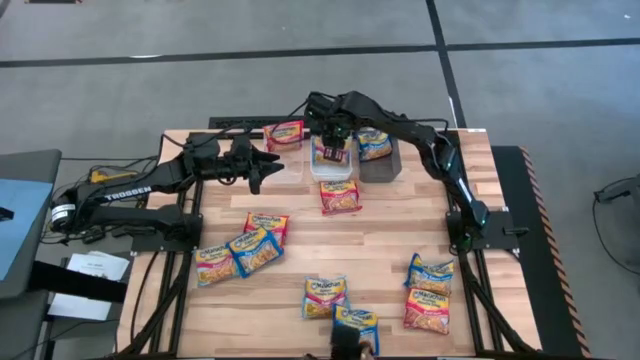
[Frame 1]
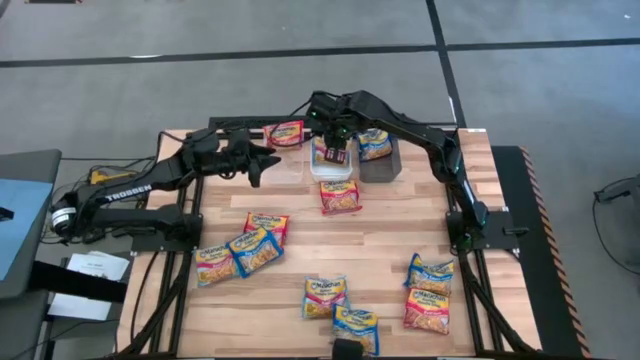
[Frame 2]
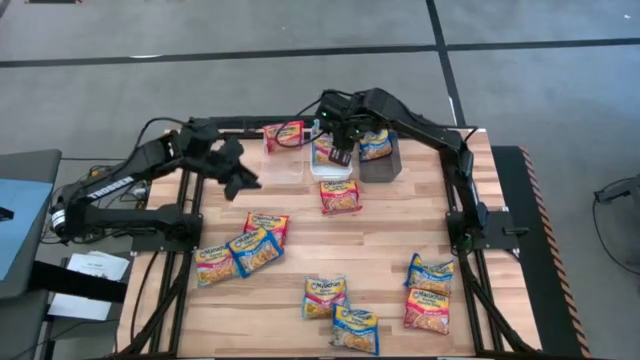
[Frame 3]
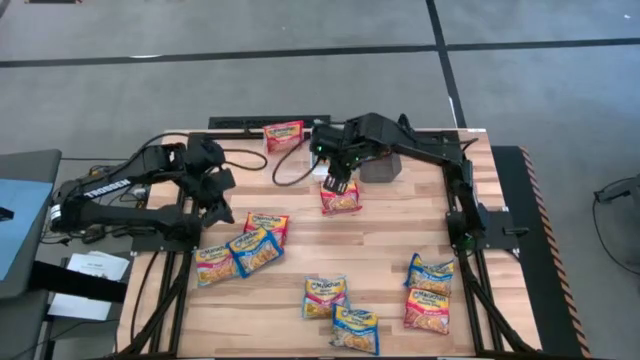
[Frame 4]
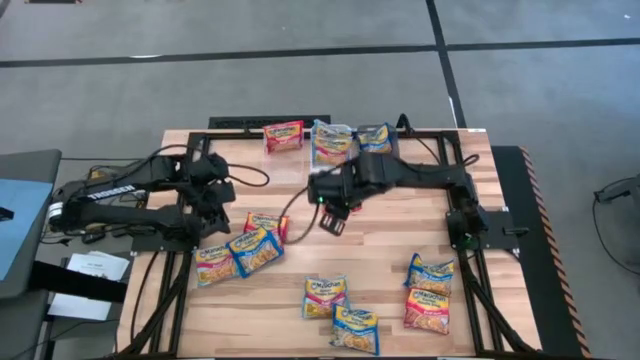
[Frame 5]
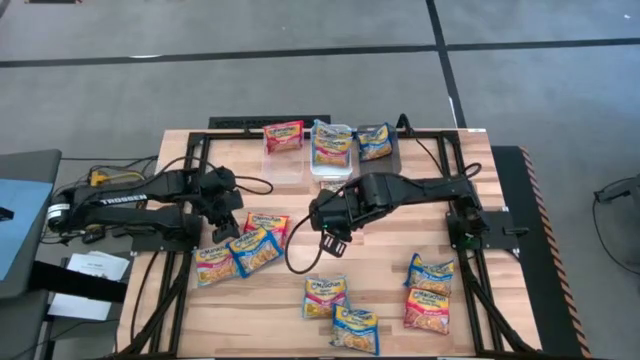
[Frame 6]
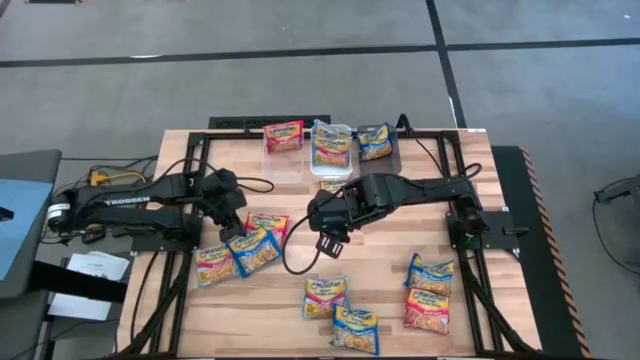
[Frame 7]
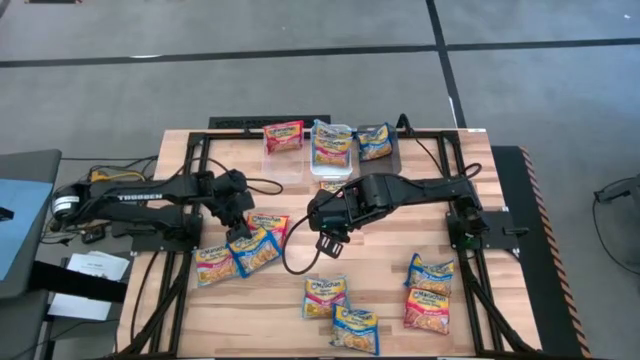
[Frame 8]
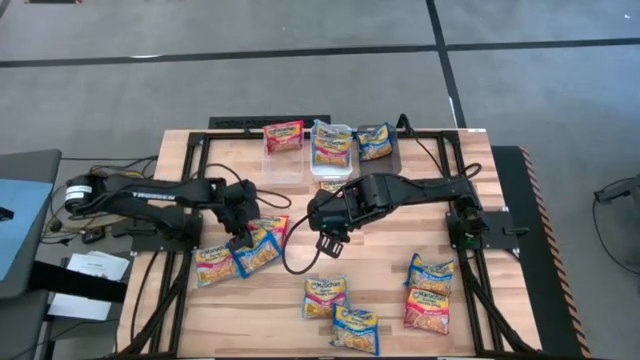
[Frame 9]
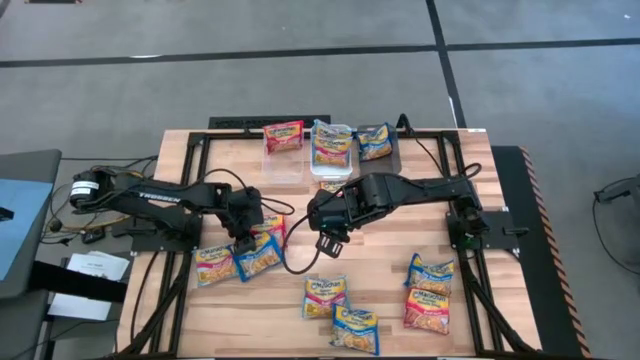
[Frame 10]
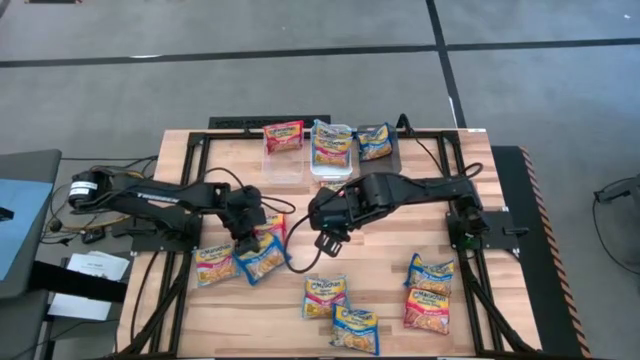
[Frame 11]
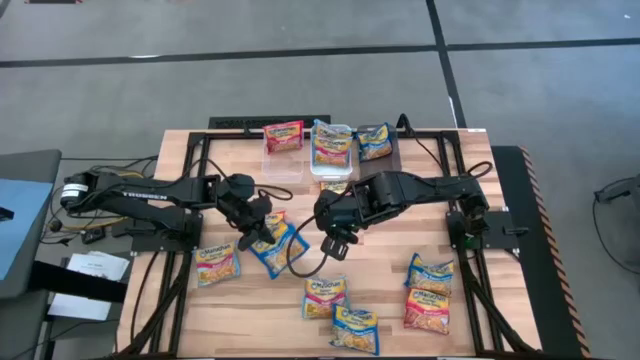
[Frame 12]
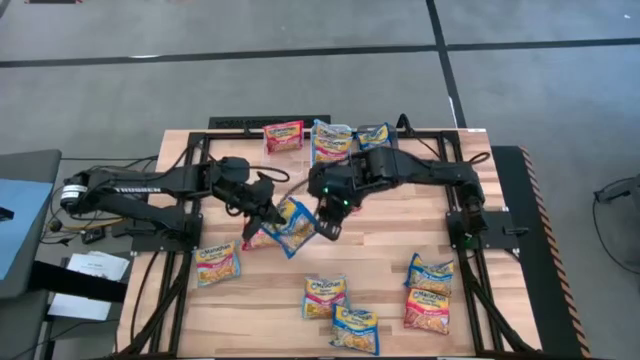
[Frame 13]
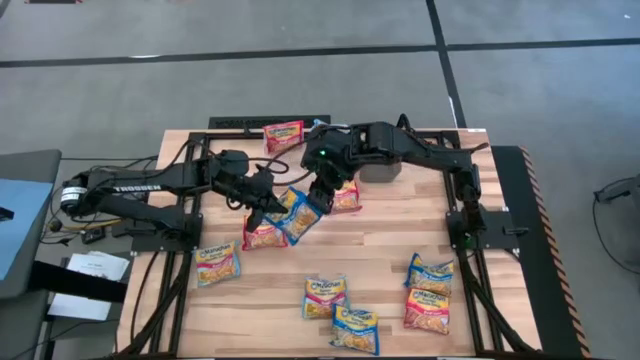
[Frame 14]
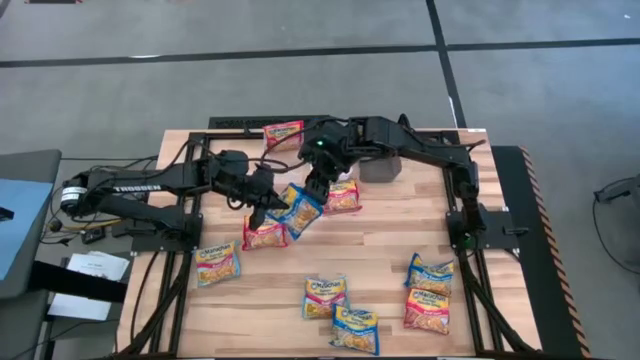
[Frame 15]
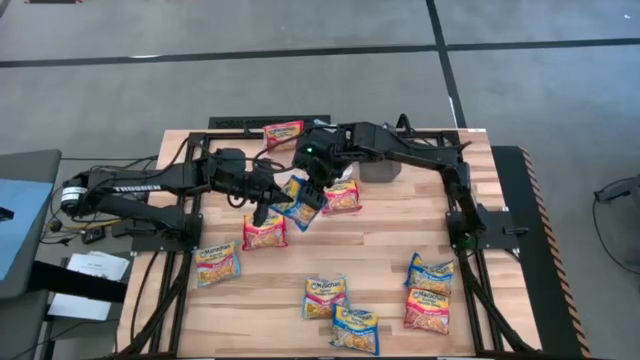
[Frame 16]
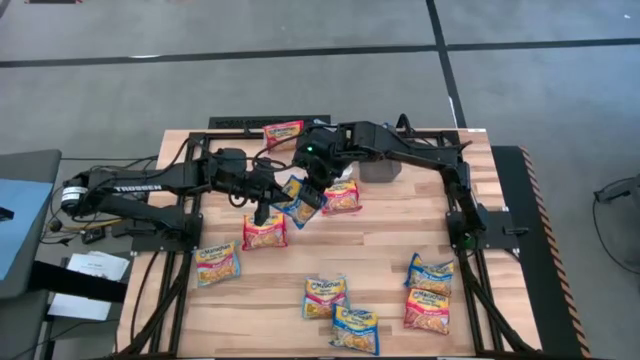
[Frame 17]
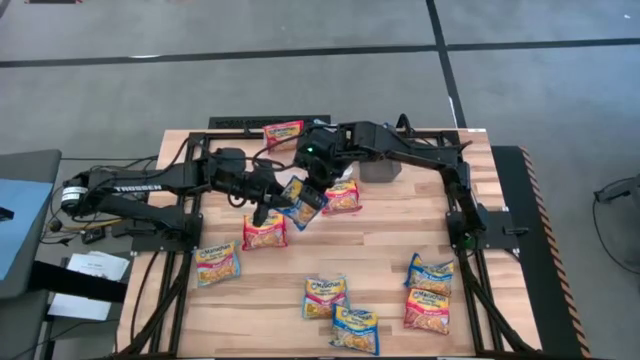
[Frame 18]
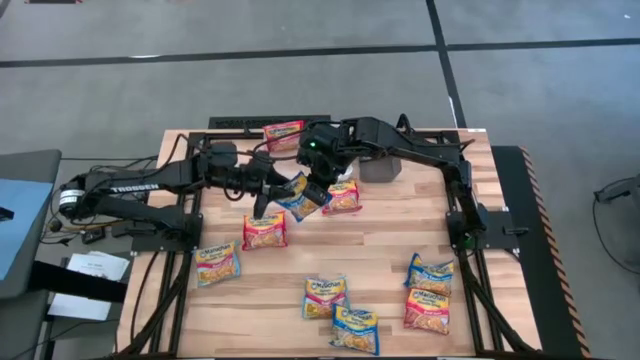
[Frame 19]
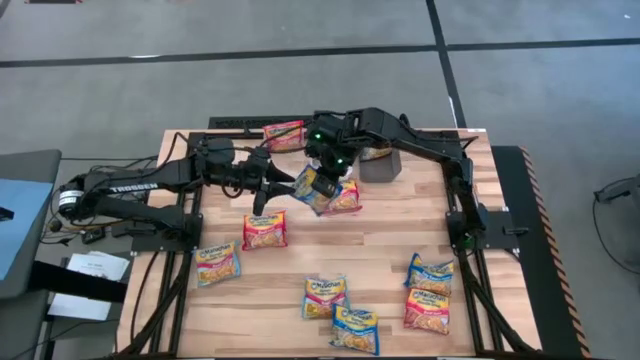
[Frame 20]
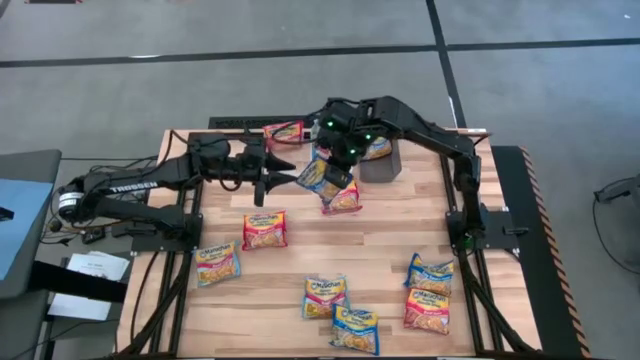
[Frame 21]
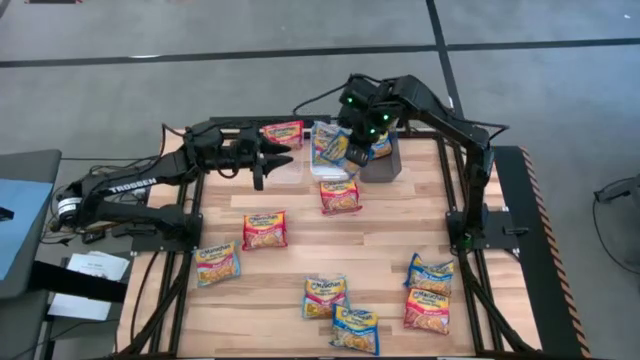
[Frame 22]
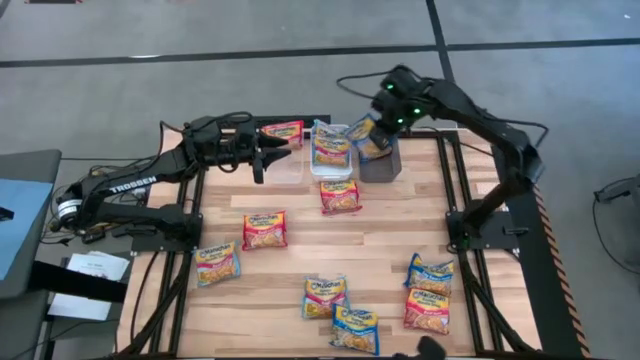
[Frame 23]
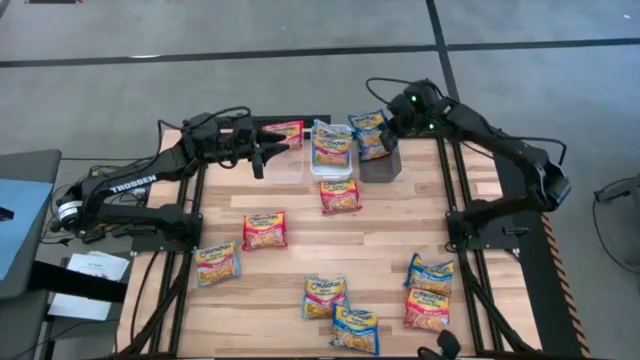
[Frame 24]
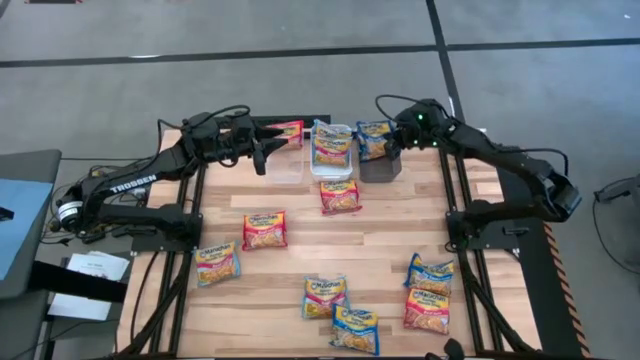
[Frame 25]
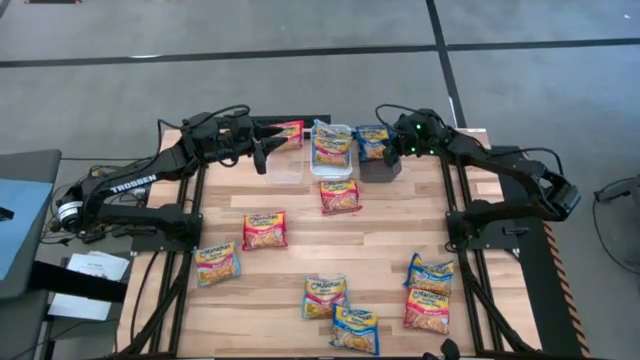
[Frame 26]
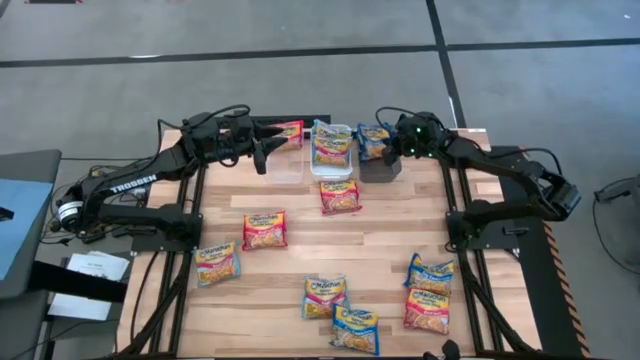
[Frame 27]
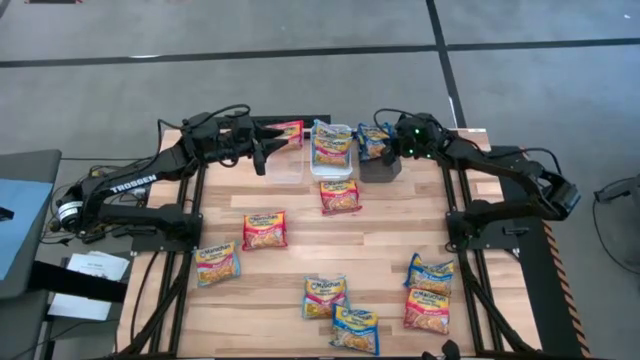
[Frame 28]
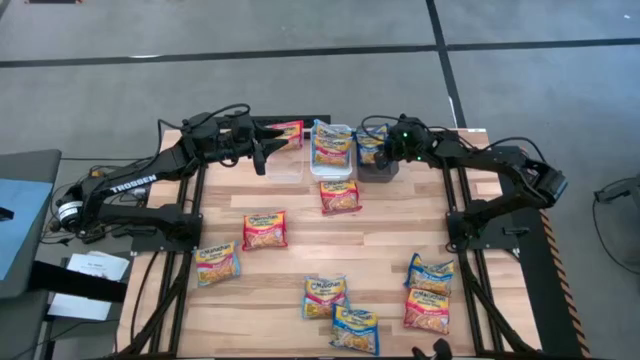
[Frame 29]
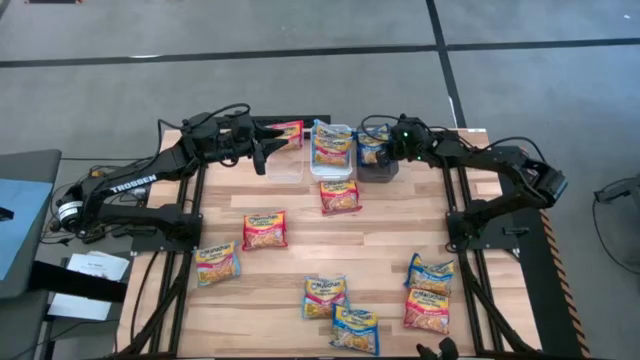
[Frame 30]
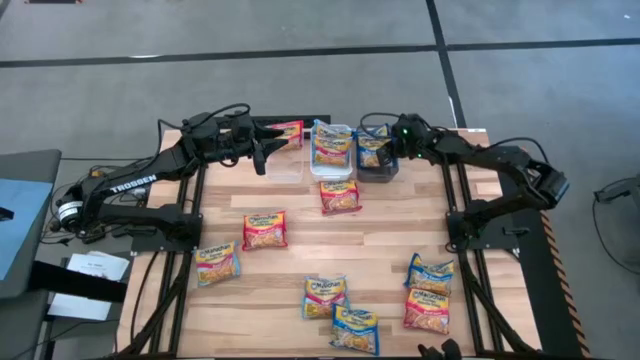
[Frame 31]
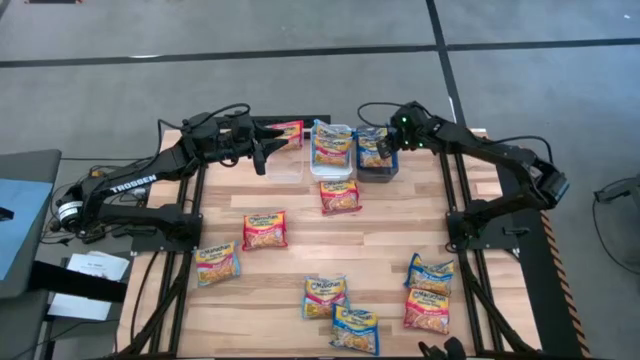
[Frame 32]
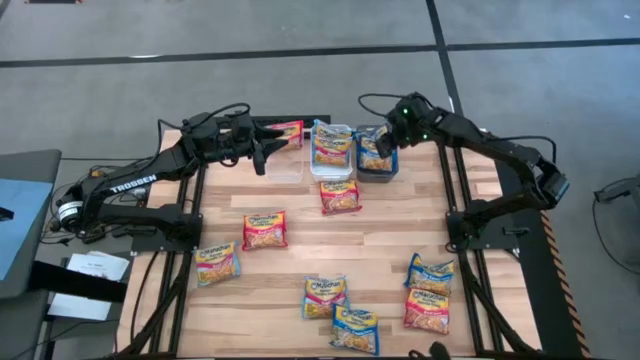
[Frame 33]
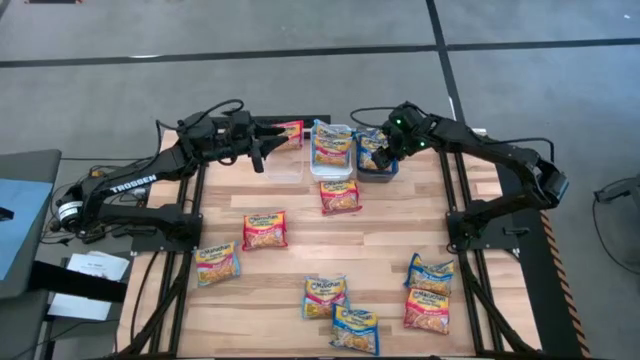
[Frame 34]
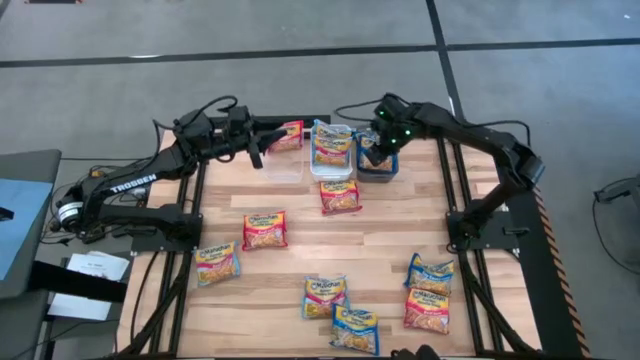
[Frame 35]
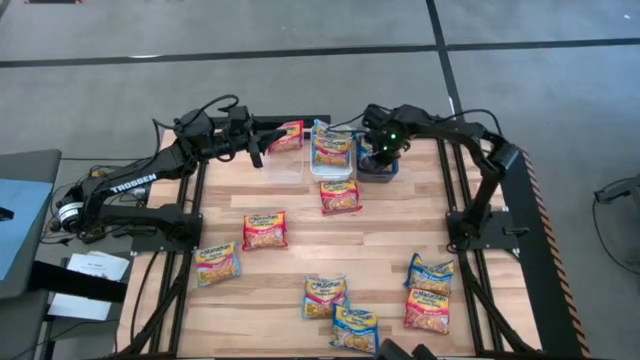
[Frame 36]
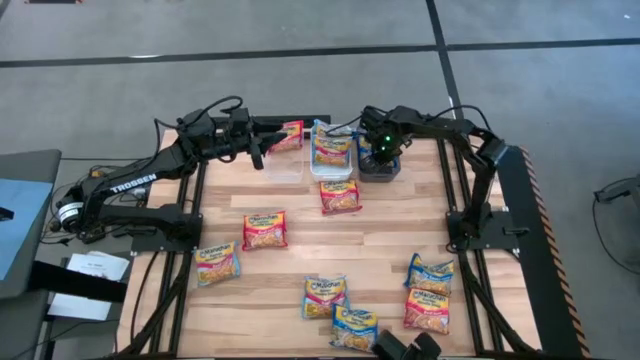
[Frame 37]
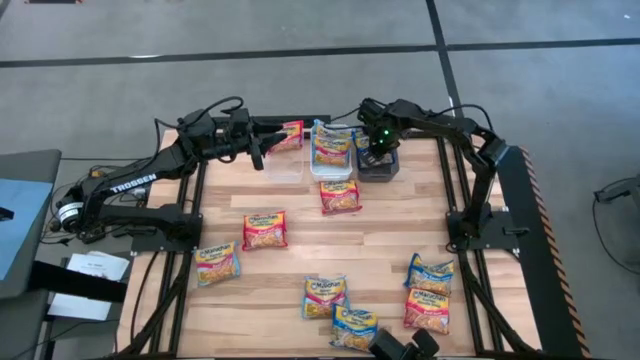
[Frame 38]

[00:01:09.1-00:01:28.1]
Task: Sort Maruchan noodles
Put the blue noodle pack into the black bin

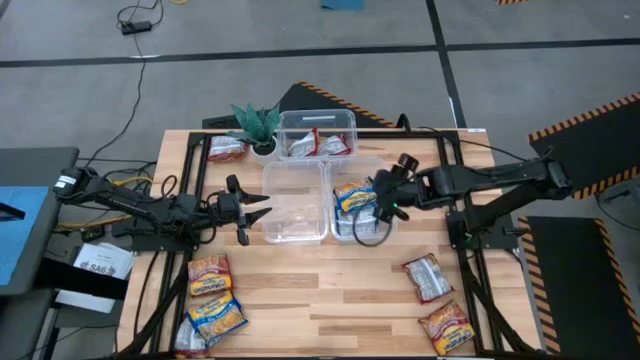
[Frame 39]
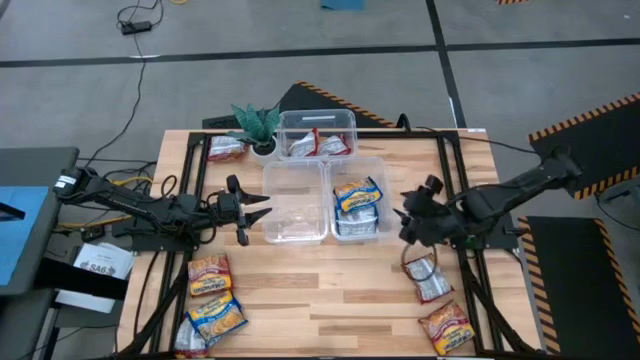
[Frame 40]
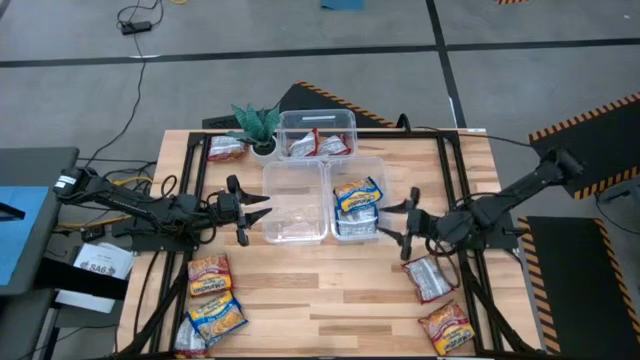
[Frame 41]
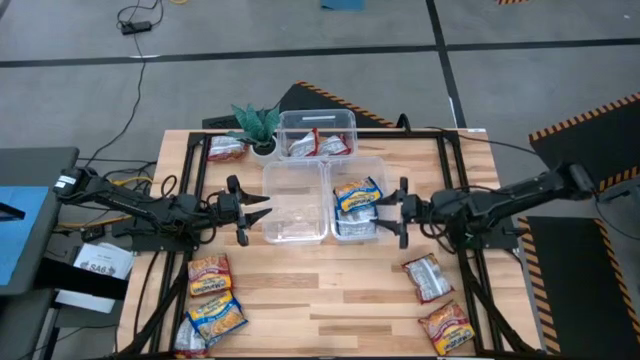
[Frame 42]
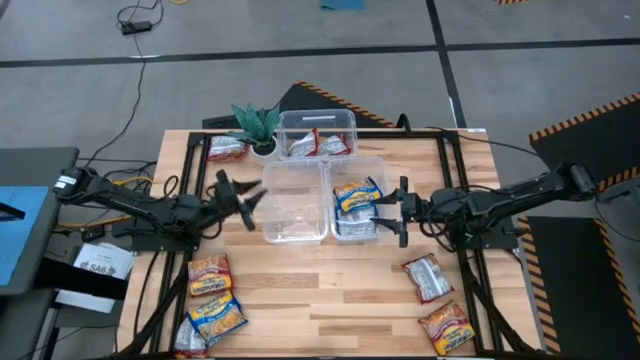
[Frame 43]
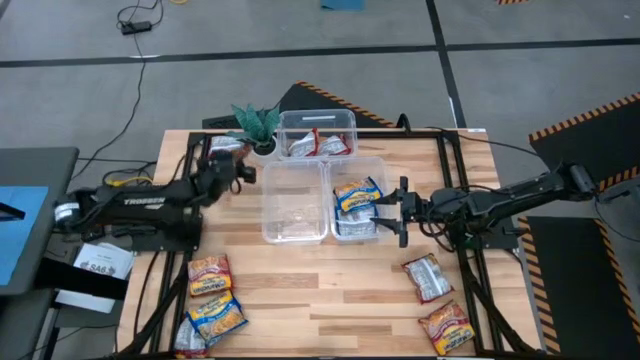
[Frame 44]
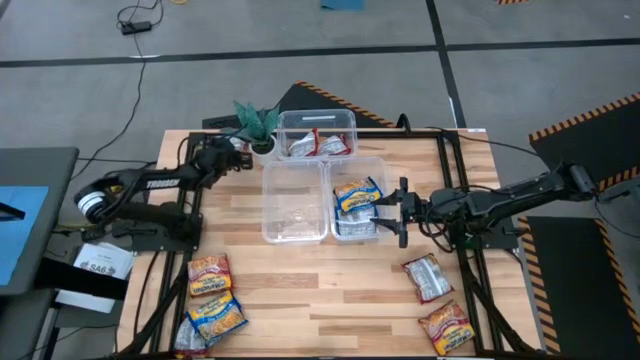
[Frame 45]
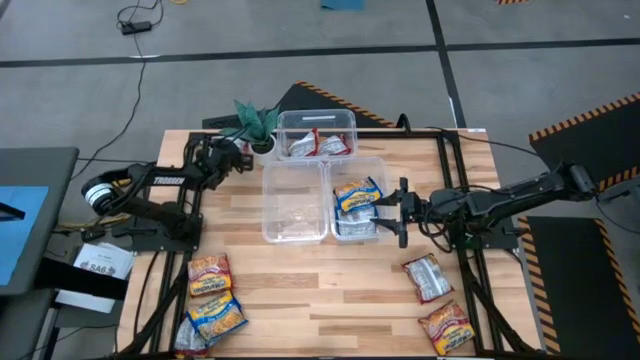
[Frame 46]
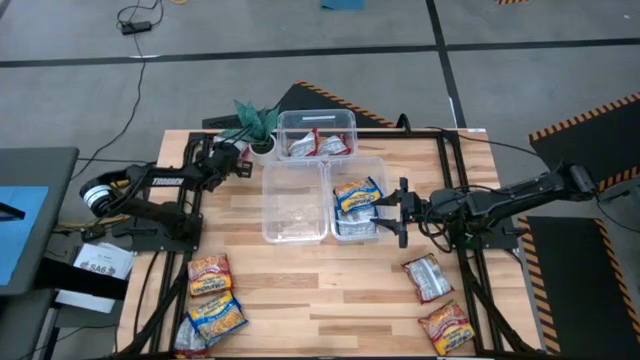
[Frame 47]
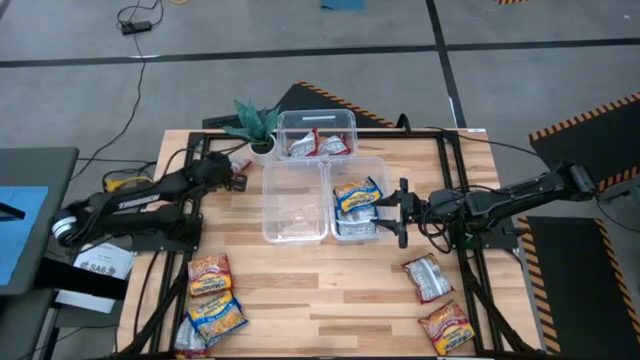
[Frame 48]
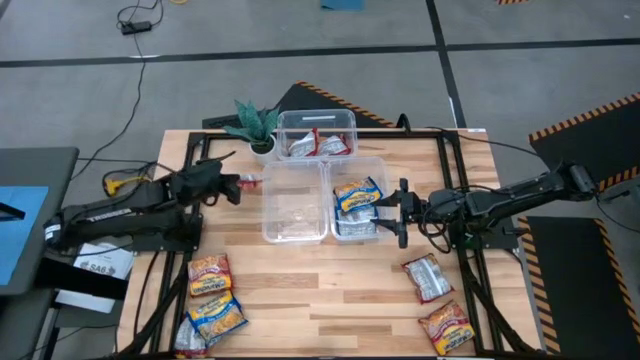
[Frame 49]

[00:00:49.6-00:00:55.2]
Task: Sort Maruchan noodles
Put the red noodle pack into the top transparent bin
